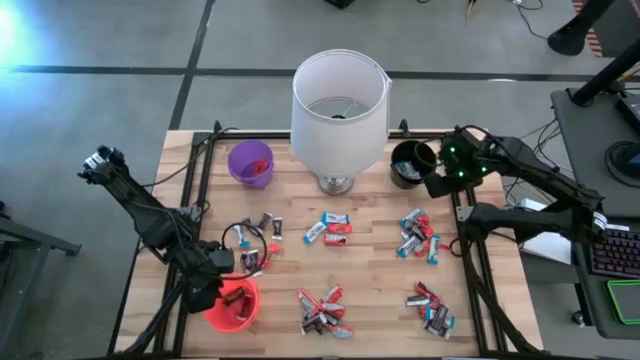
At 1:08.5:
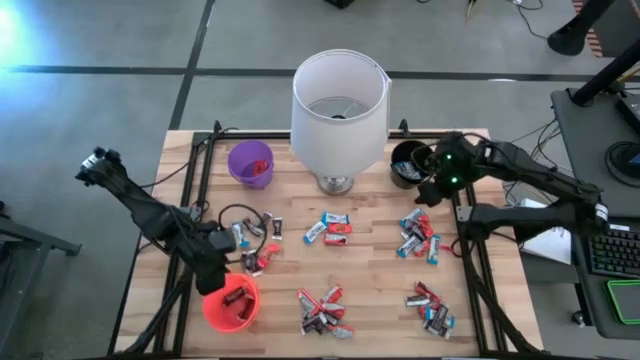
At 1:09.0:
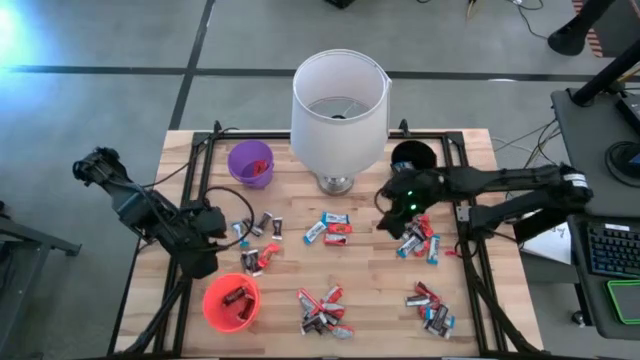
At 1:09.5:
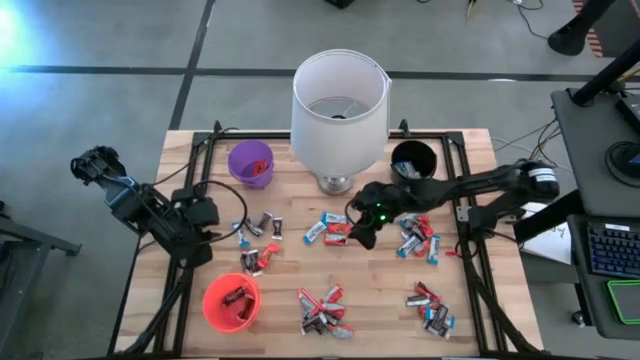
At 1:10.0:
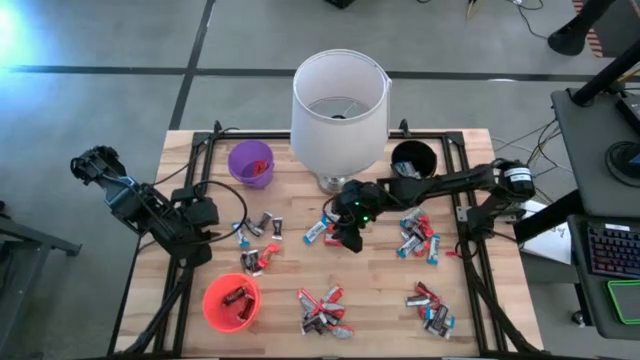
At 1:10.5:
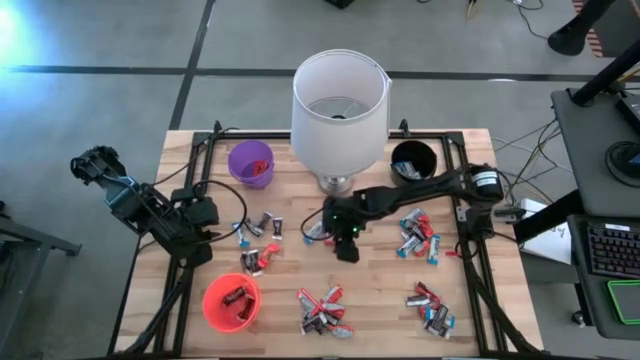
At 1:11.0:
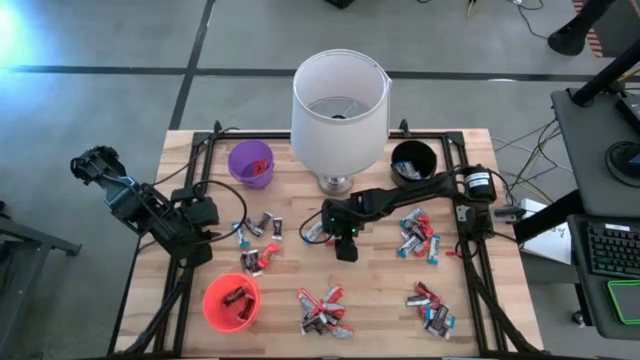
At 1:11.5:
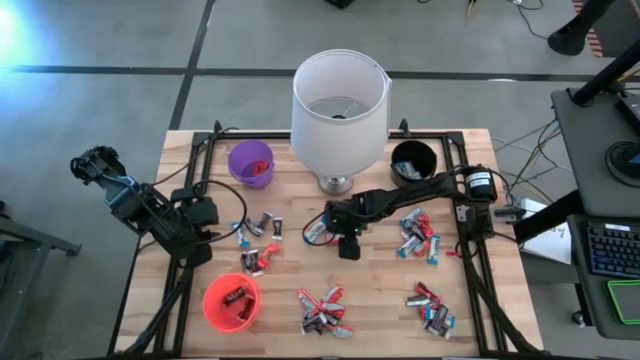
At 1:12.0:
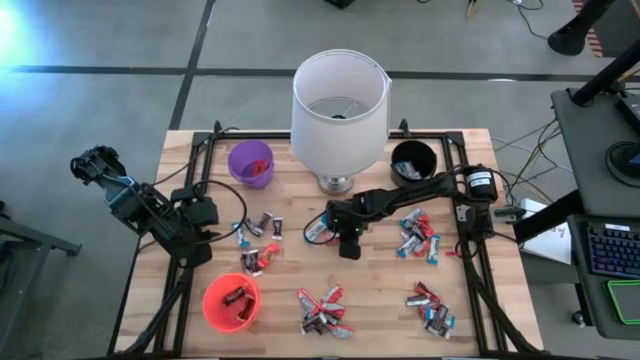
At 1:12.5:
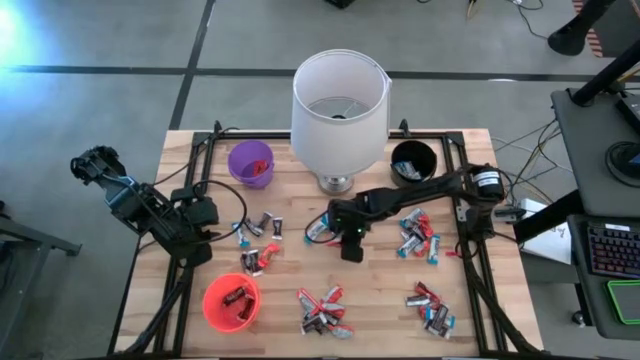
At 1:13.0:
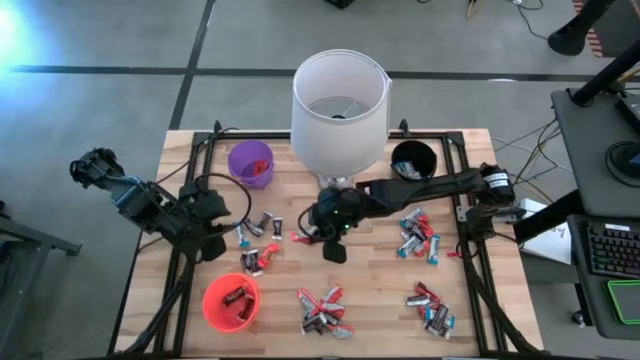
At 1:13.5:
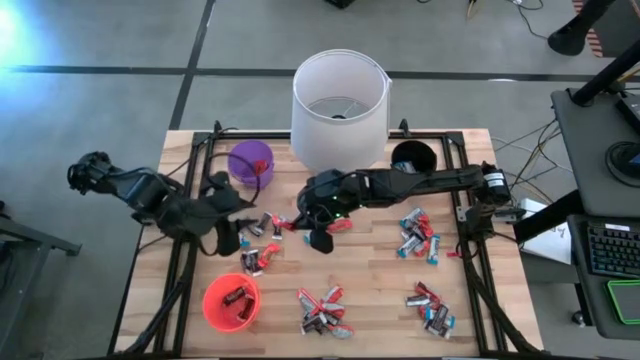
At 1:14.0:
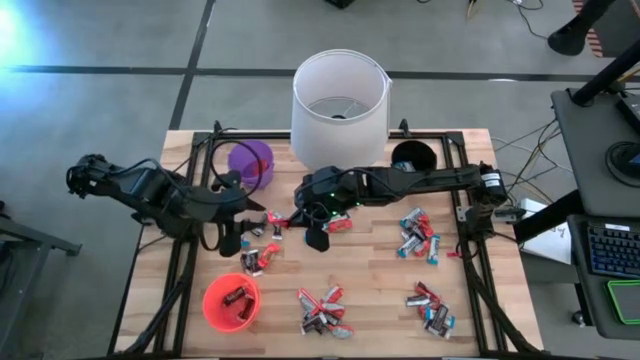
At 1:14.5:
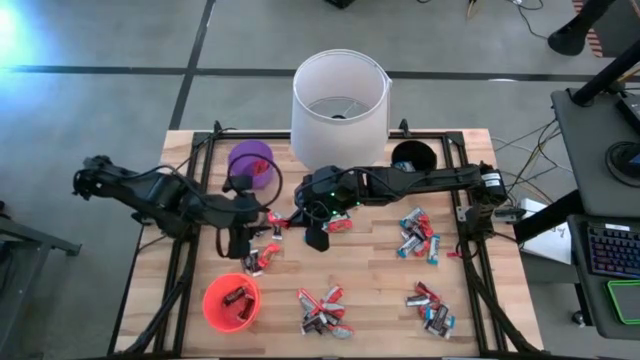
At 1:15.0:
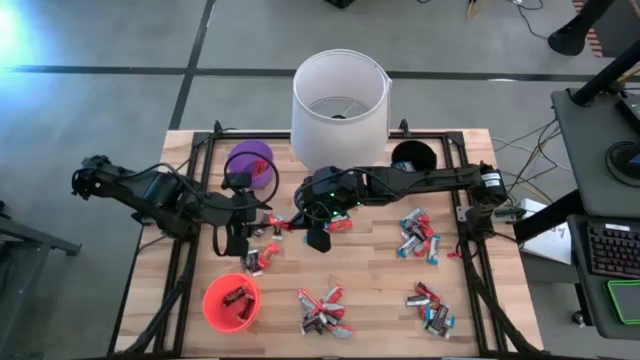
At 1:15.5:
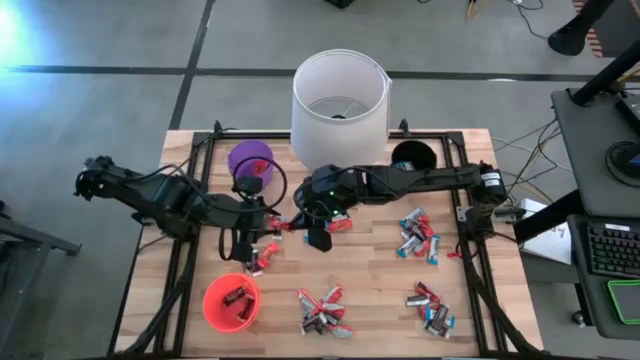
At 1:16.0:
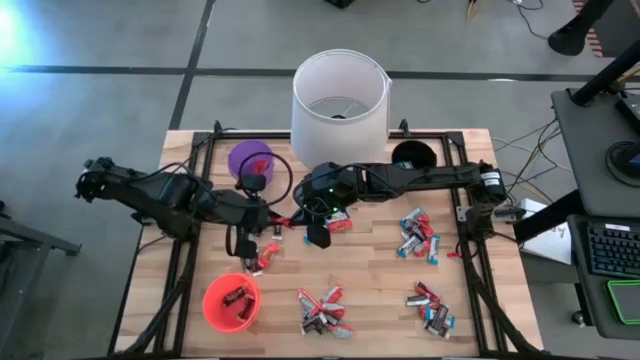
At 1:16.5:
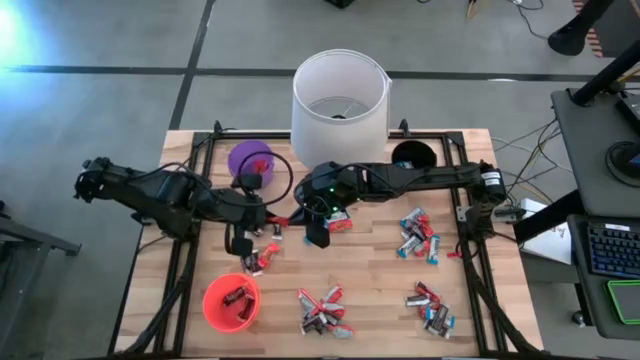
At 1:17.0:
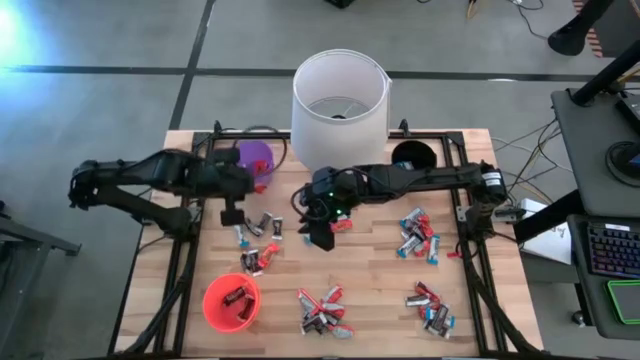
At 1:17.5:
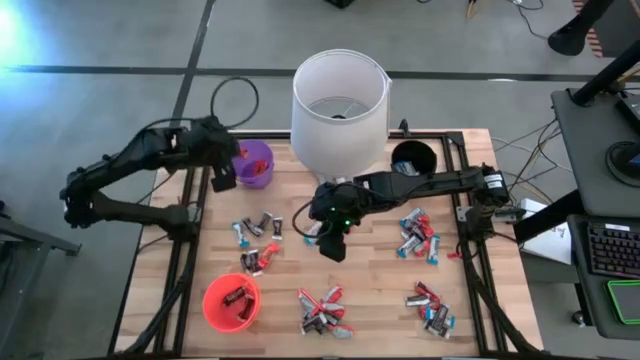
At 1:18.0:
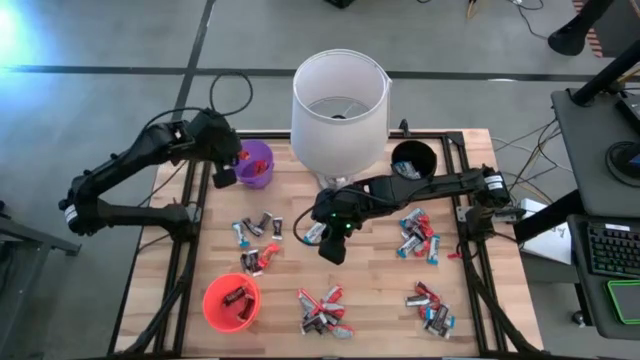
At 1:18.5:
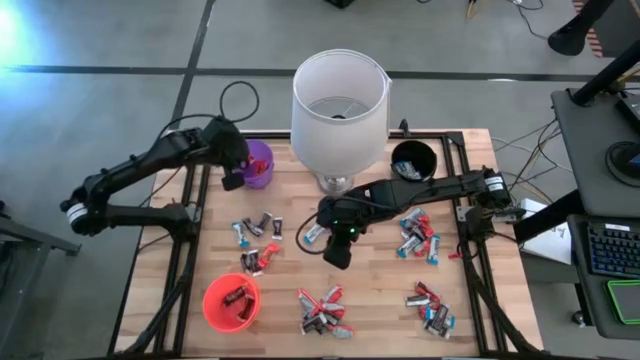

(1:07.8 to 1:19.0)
Task: Sort candy
Put the orange chocolate into the purple bucket

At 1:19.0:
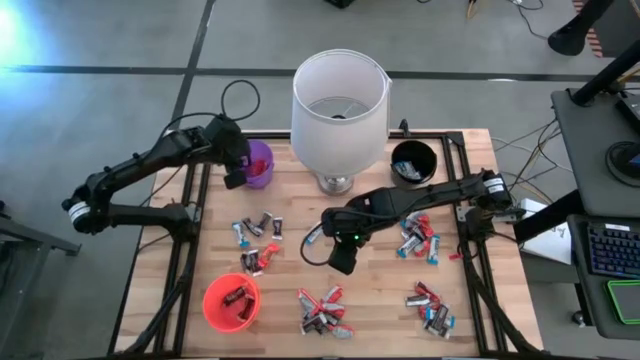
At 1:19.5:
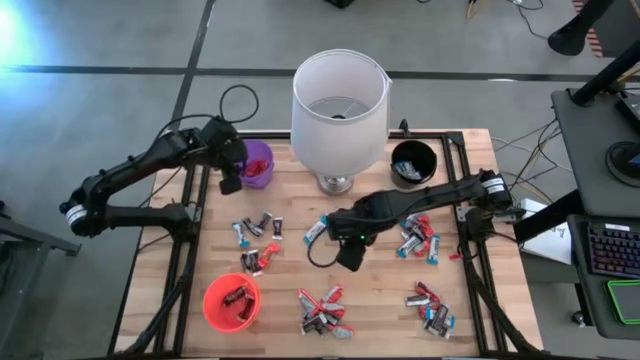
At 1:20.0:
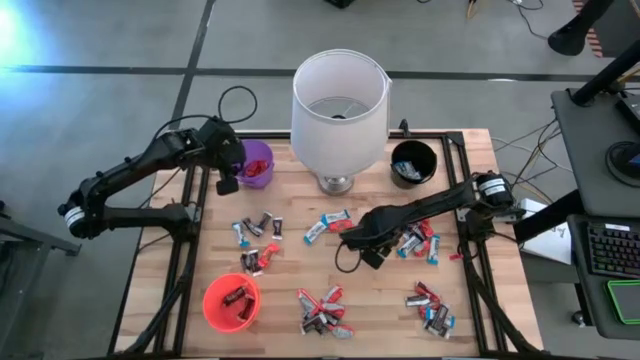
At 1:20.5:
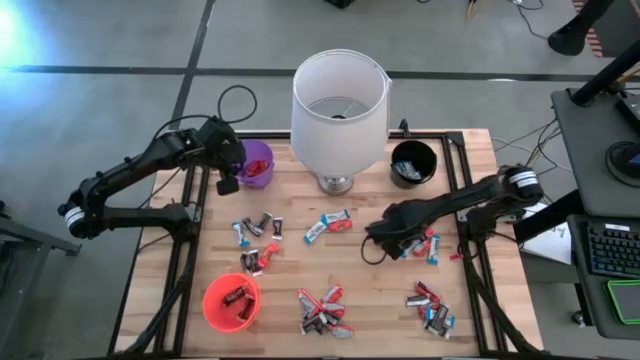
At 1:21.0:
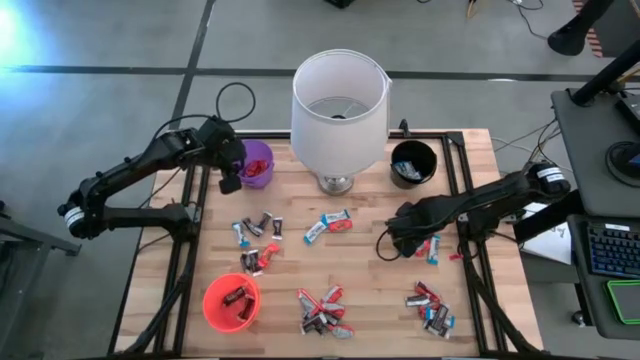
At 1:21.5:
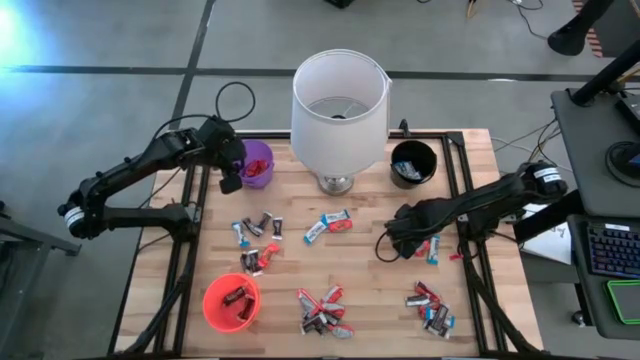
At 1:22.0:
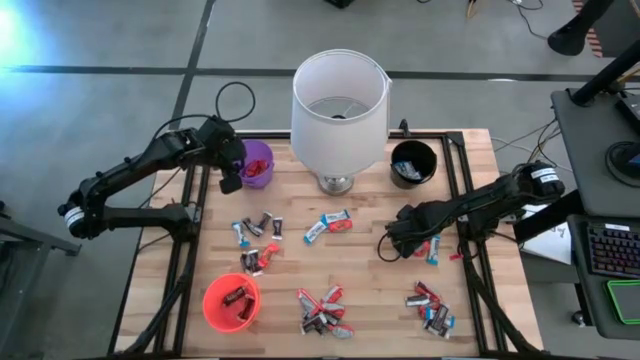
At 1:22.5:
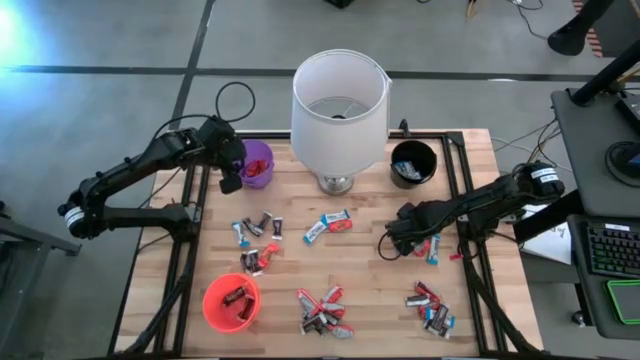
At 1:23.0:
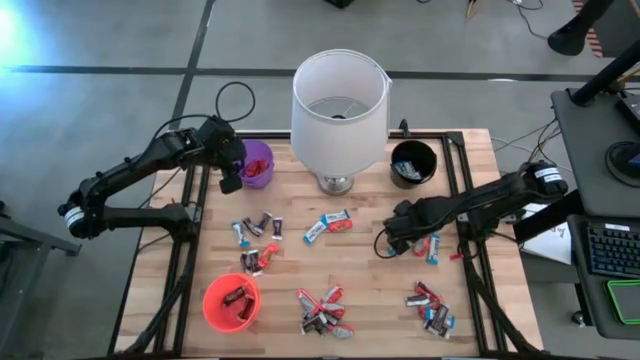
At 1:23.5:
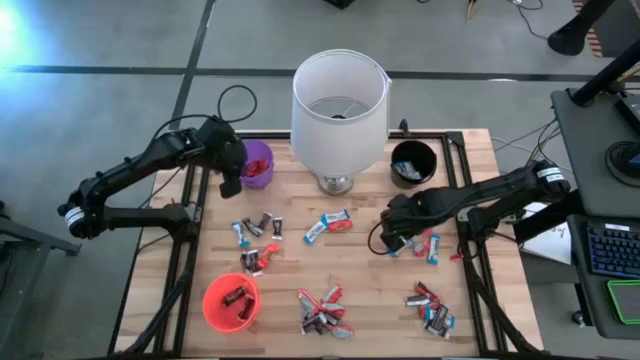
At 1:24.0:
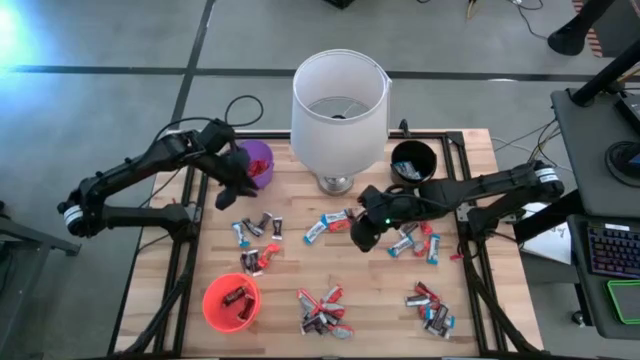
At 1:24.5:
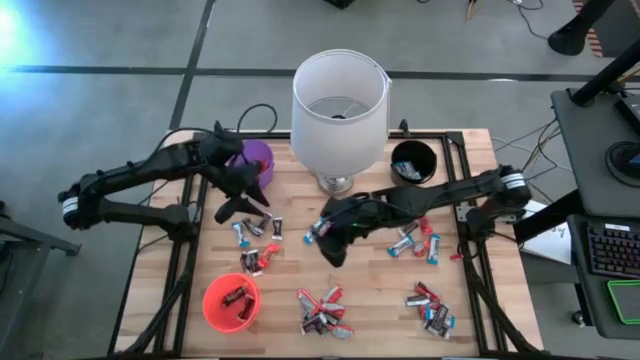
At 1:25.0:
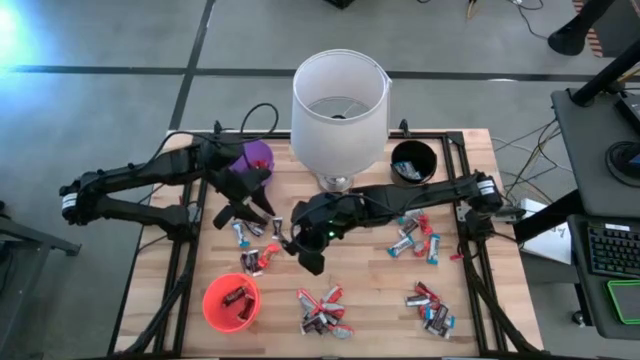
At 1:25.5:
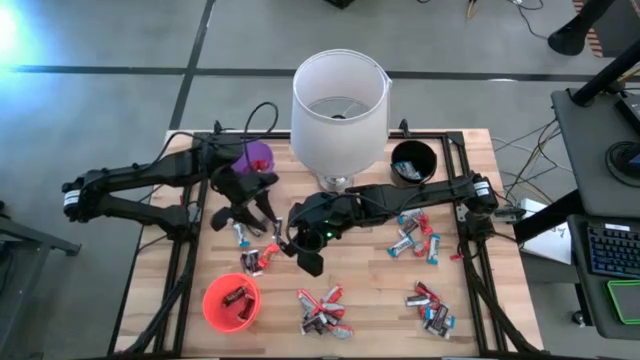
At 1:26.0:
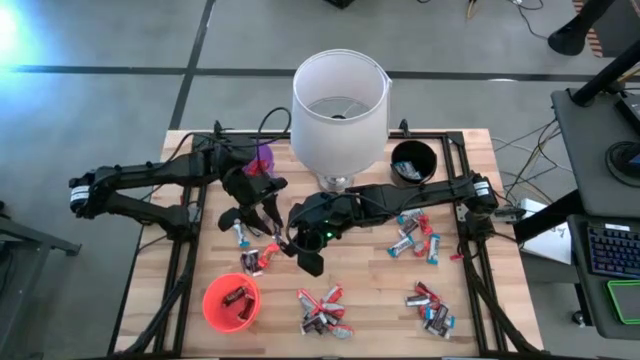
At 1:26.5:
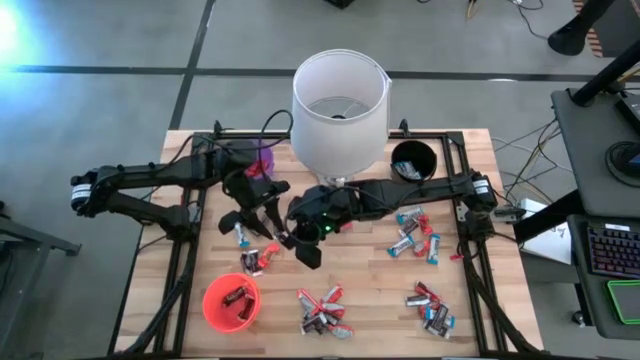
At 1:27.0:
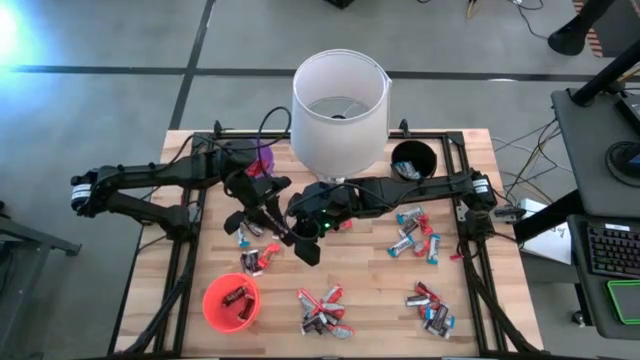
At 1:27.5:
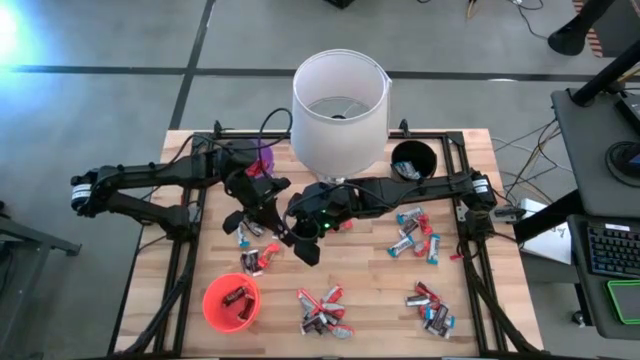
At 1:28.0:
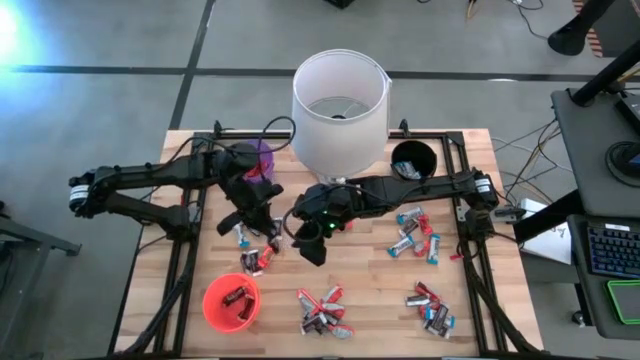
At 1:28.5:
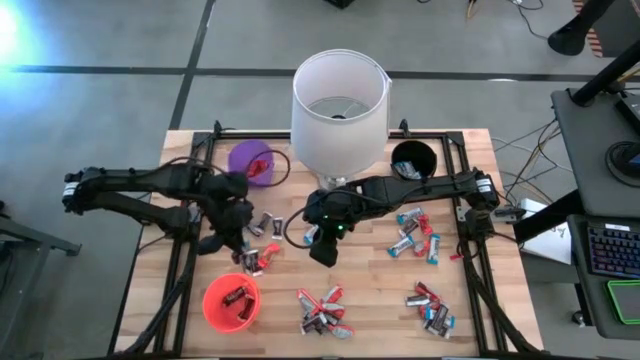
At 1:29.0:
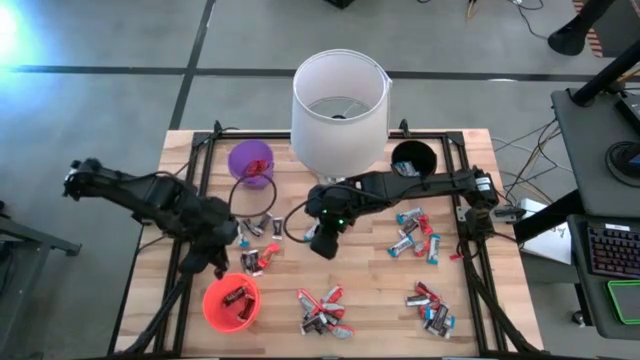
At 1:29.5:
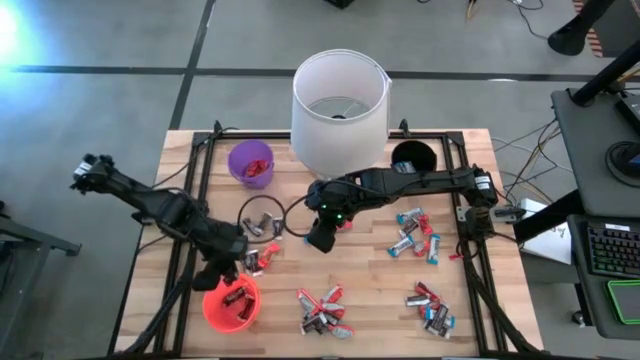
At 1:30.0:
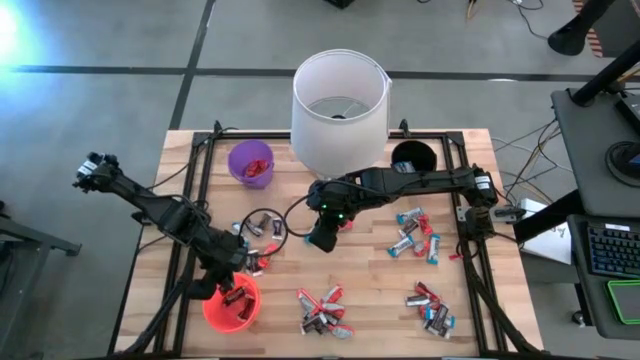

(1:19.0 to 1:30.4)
Put the black chocolate into the orange bucket
